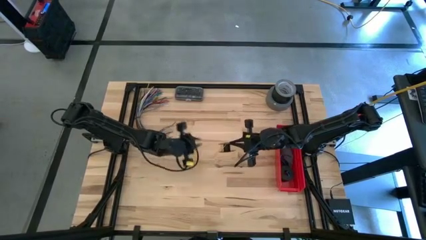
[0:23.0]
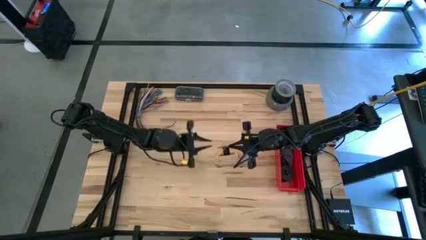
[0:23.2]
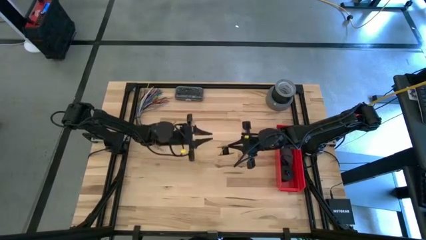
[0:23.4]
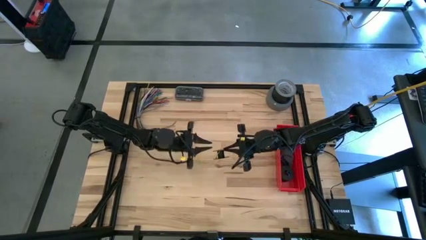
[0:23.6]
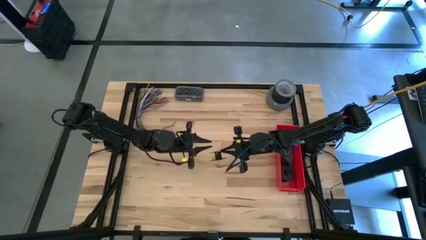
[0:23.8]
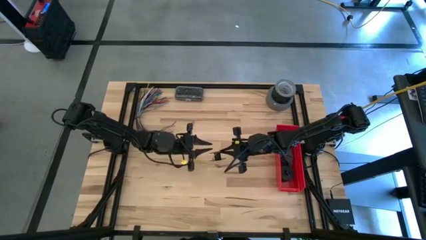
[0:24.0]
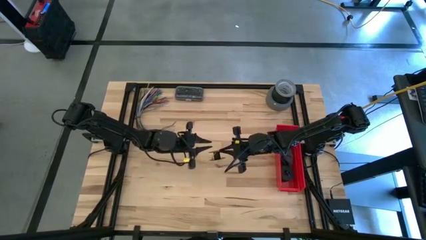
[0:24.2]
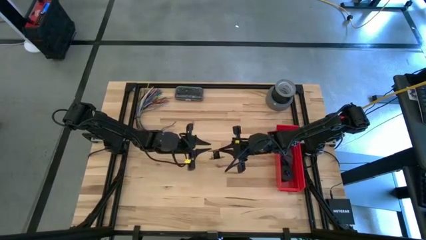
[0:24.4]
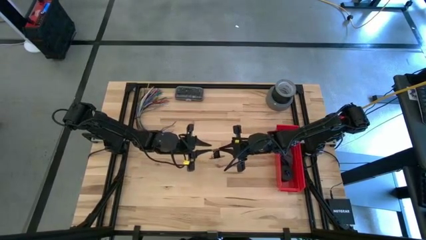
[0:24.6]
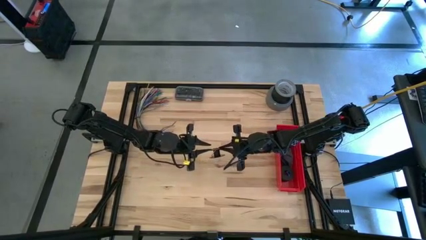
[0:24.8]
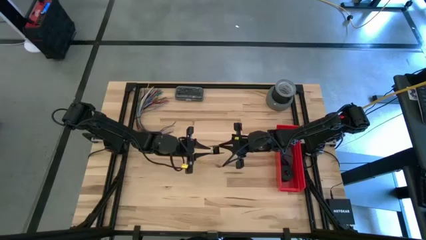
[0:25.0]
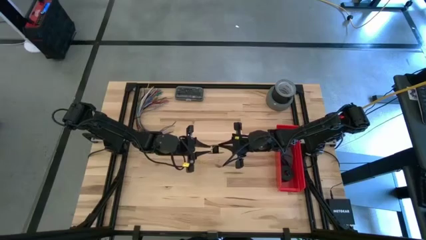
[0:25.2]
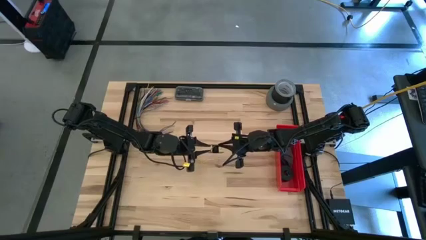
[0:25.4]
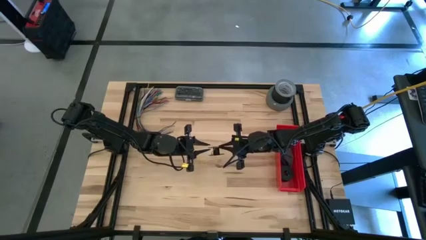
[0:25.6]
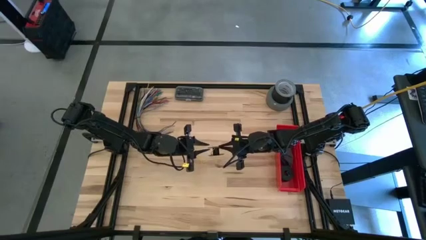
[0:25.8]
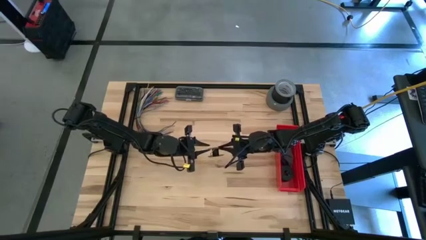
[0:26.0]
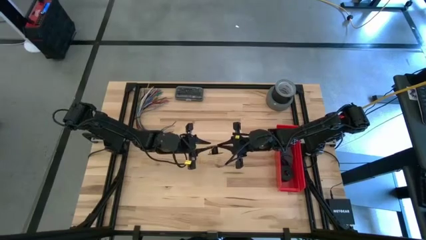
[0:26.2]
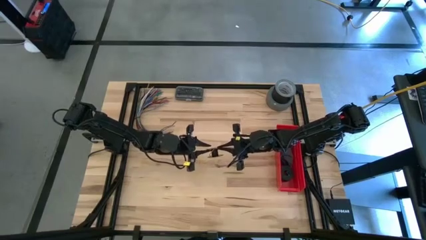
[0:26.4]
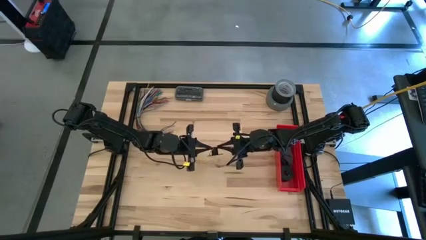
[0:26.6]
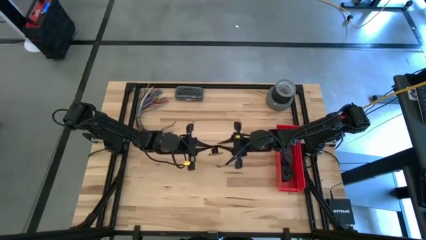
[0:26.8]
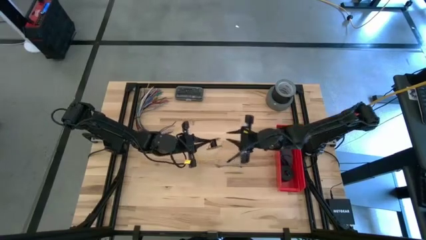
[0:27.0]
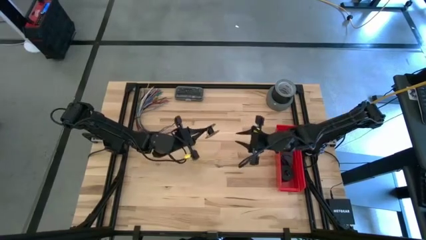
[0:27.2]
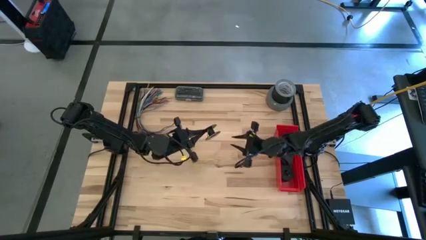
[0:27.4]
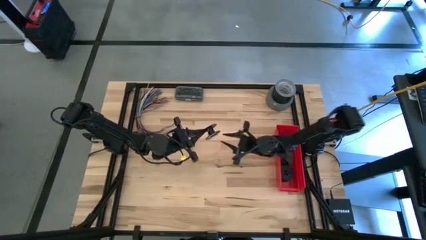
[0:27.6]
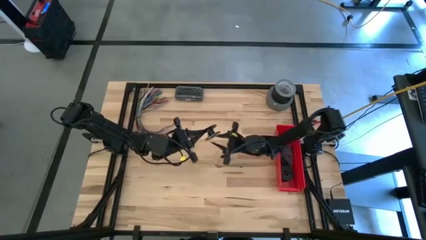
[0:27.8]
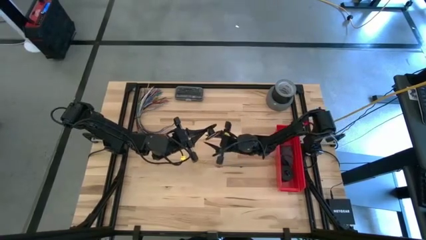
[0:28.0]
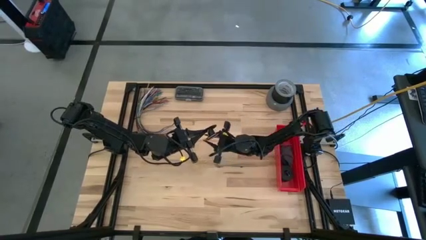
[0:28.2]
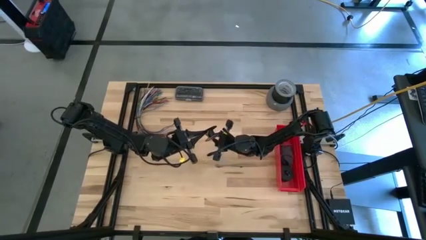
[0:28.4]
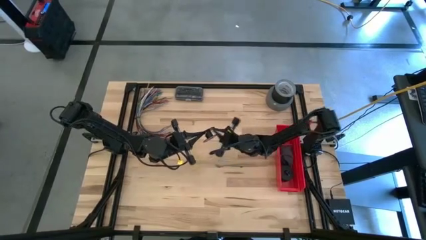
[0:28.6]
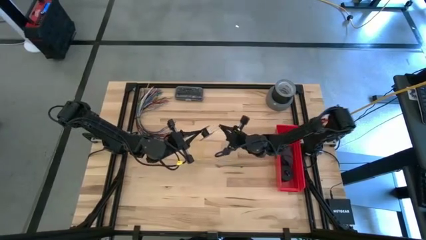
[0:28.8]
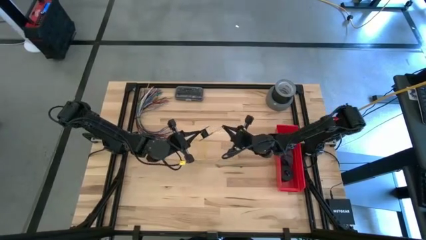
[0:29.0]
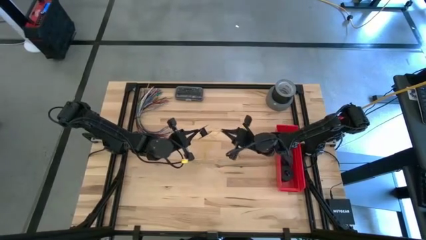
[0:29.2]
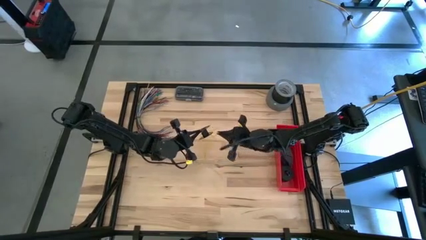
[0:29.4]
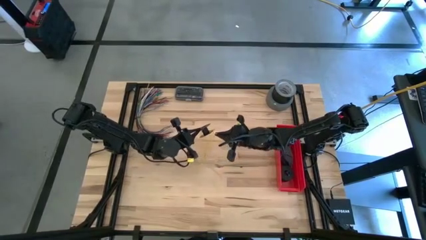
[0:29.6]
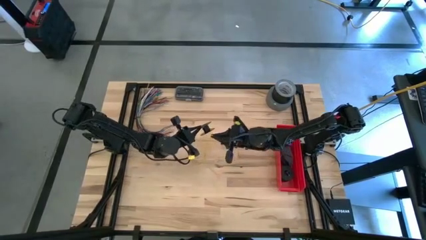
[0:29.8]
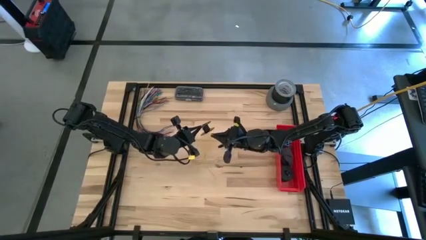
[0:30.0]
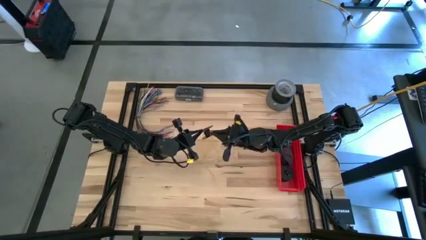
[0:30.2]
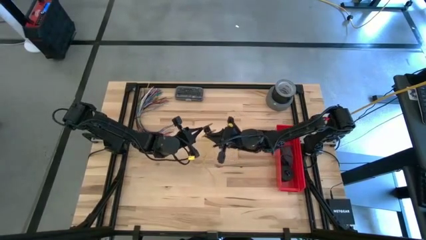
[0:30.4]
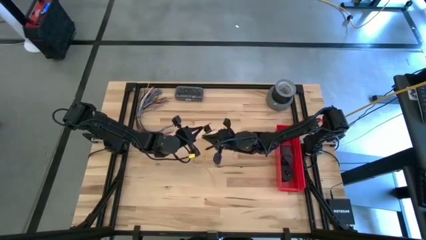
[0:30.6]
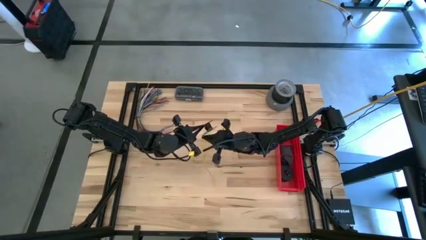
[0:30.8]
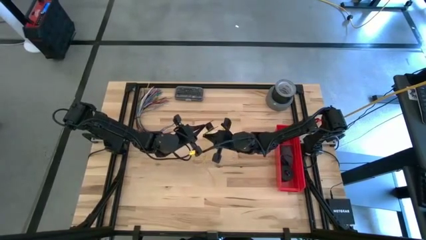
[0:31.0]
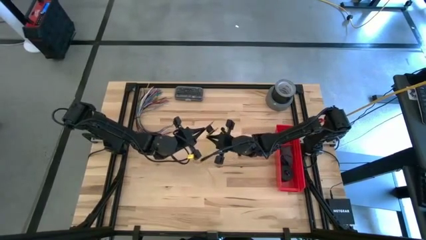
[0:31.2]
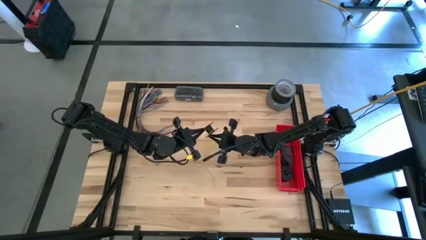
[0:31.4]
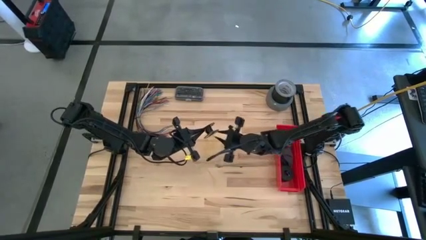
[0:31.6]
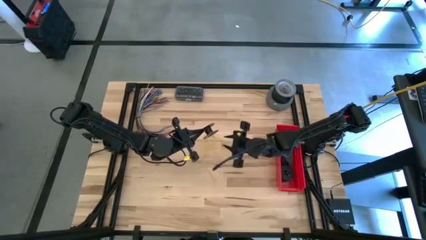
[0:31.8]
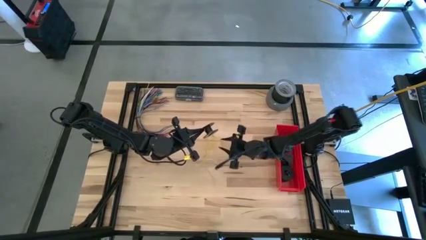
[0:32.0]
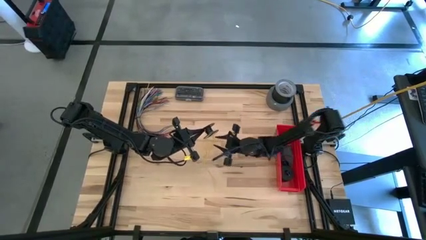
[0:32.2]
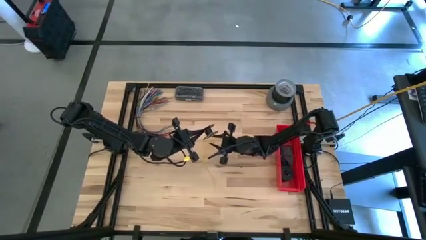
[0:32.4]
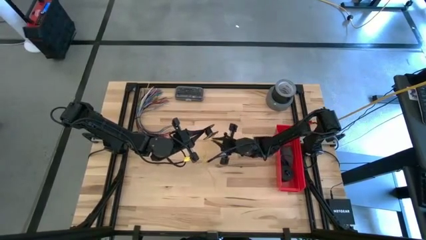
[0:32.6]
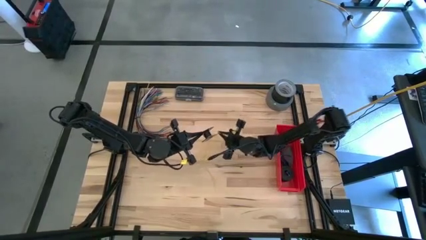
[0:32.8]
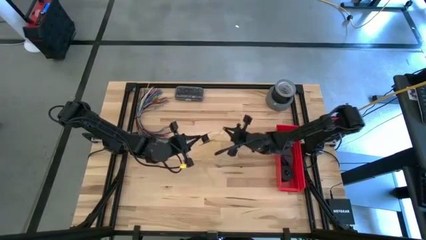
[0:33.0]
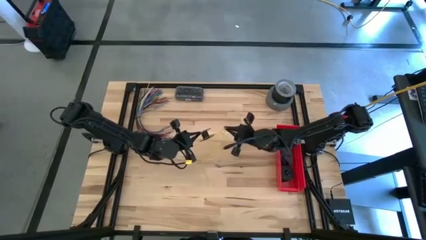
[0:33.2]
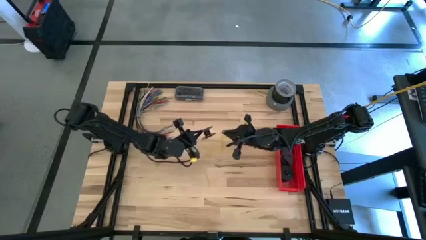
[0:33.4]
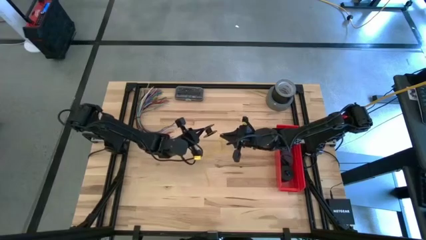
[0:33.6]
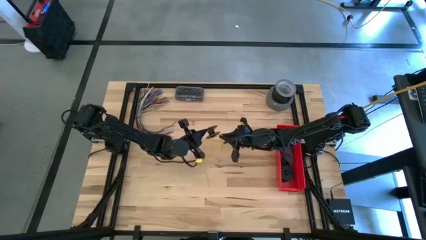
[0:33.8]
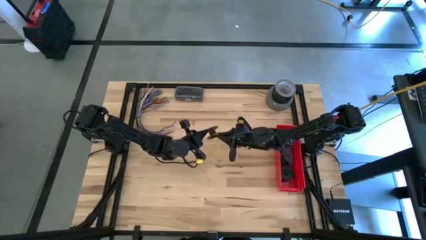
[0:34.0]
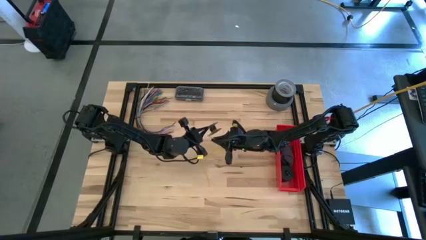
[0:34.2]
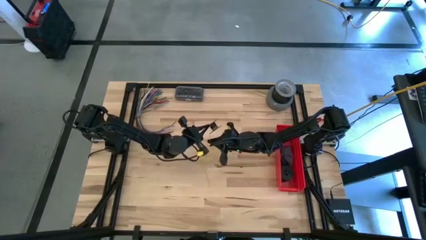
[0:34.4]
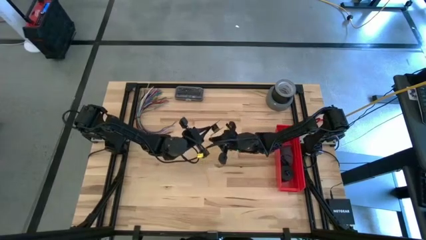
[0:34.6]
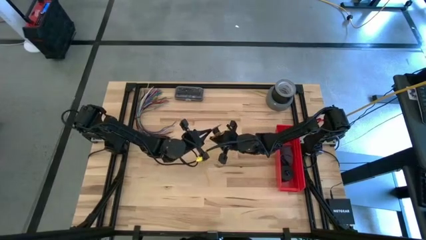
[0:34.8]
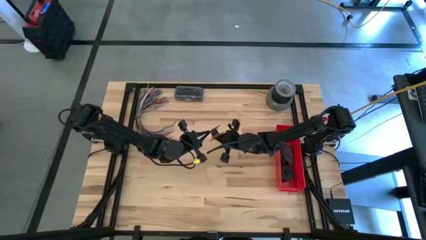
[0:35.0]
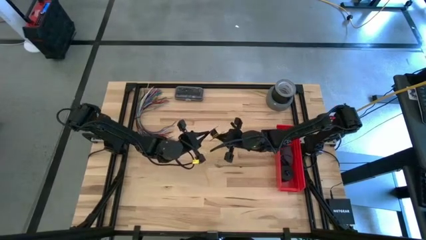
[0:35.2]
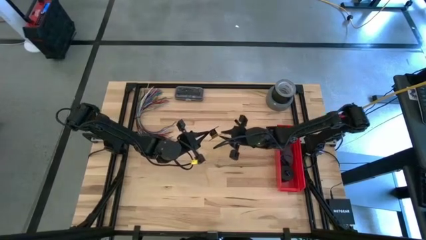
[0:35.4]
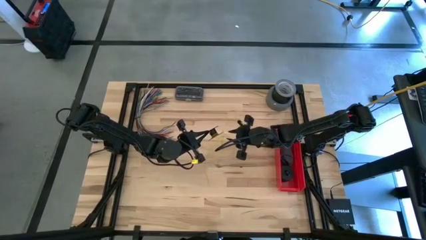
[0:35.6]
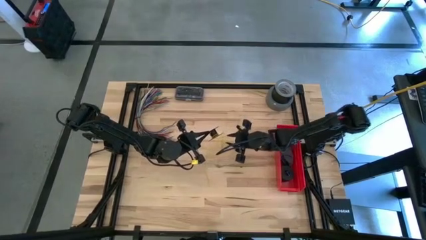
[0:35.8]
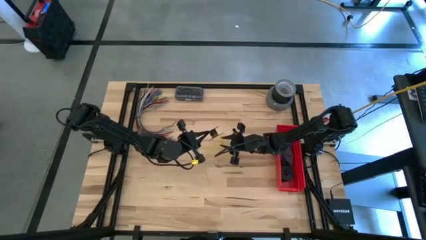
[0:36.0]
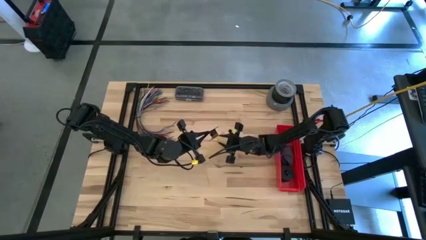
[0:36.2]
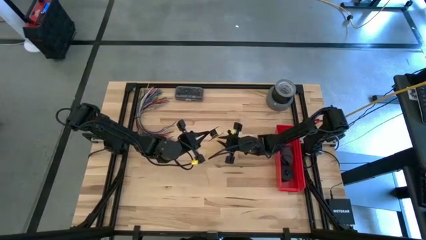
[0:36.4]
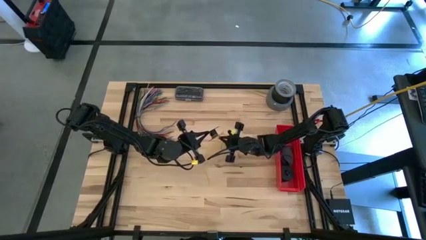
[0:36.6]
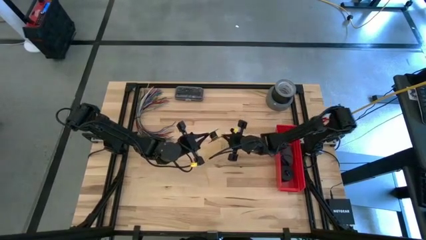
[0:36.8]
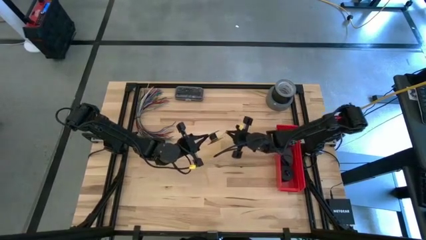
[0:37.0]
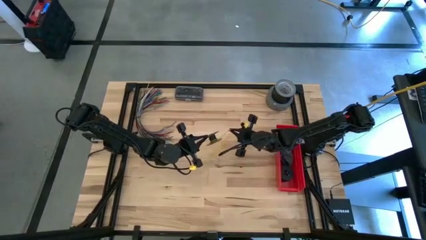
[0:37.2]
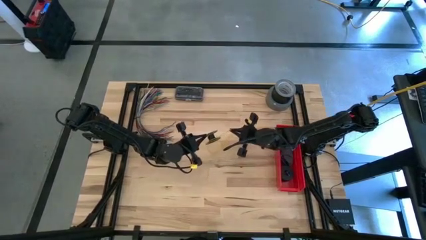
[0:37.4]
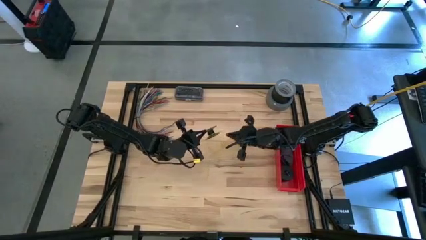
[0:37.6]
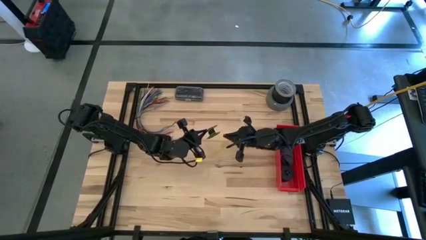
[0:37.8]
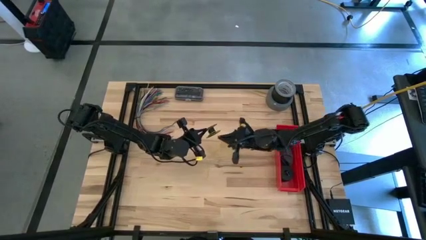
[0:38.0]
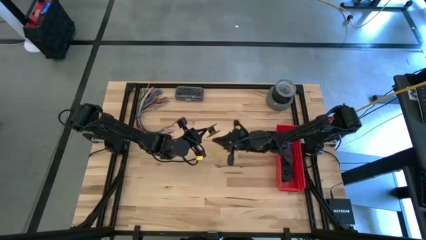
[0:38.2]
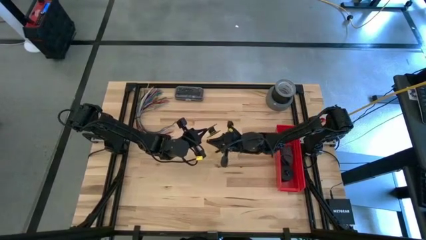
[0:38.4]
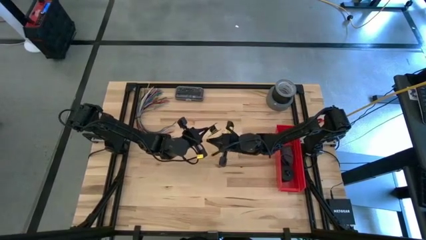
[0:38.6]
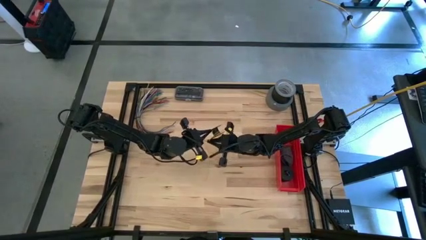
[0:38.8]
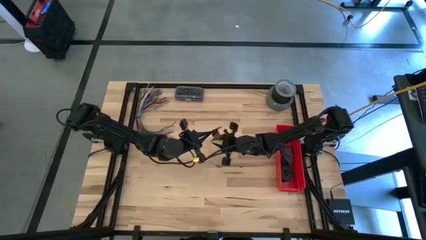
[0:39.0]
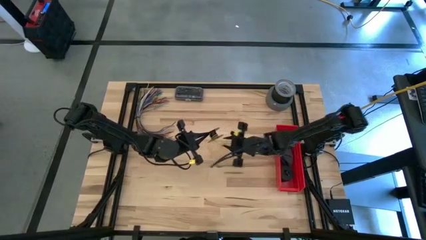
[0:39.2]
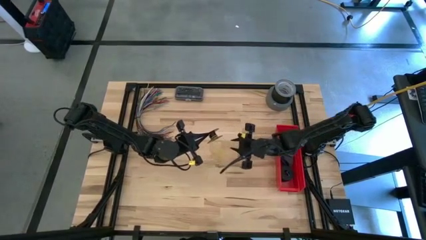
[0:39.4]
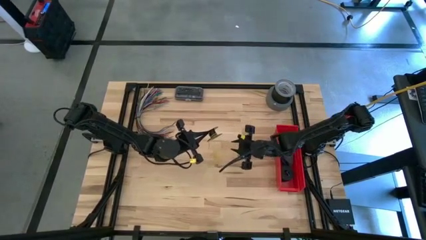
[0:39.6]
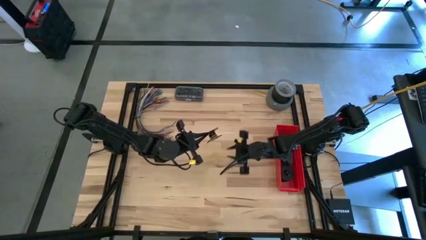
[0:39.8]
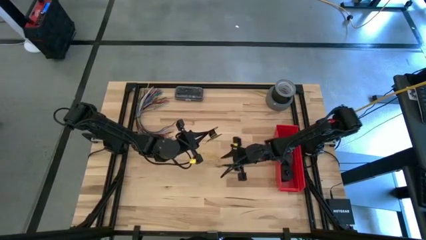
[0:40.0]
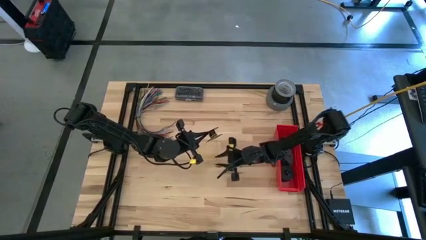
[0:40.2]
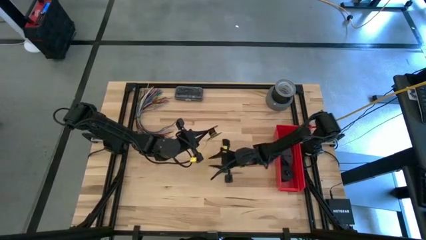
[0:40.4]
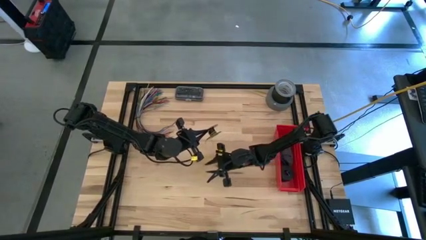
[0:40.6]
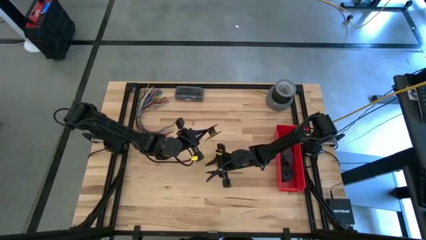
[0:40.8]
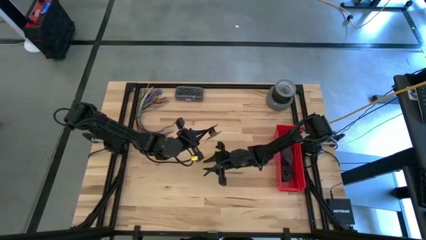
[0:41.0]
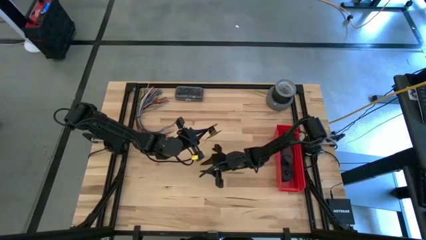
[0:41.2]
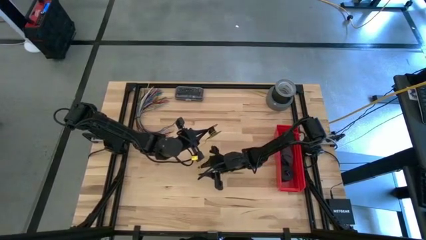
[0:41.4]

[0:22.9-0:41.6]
Task: Coil cords
Coil the yellow wire onto the black spool
